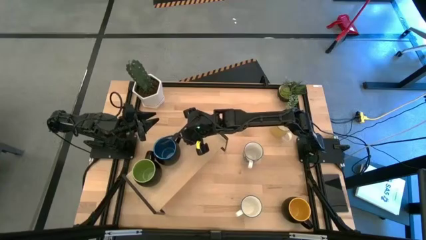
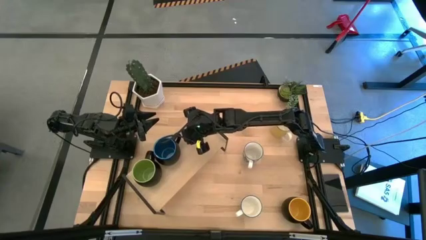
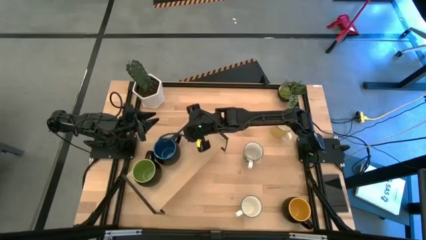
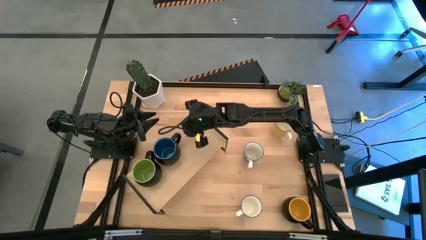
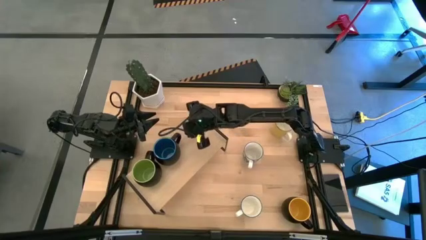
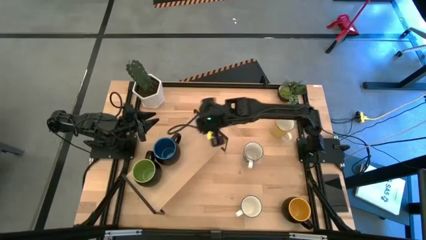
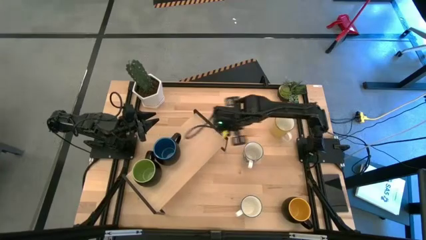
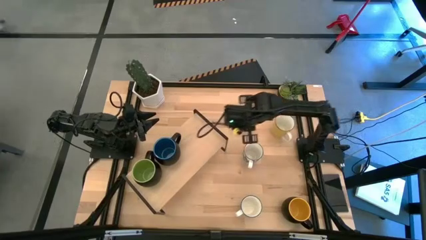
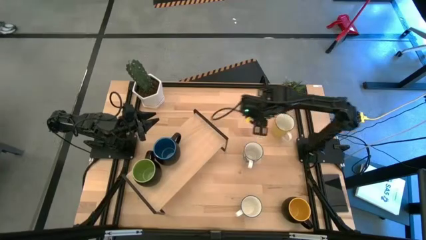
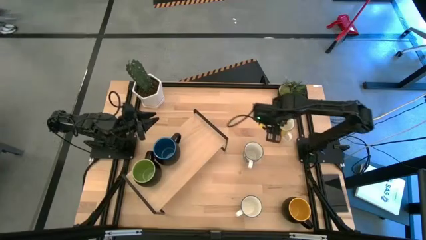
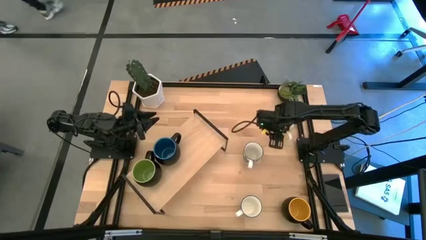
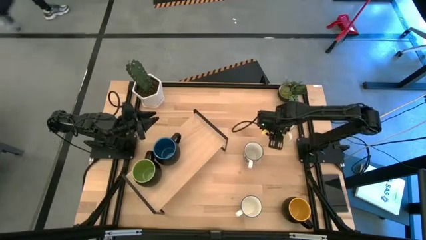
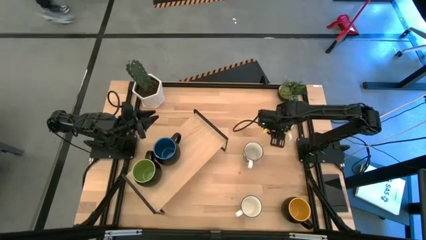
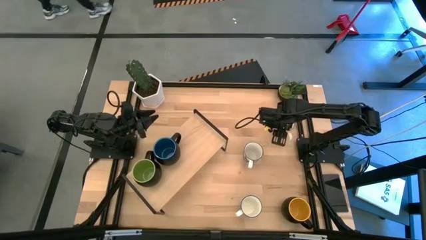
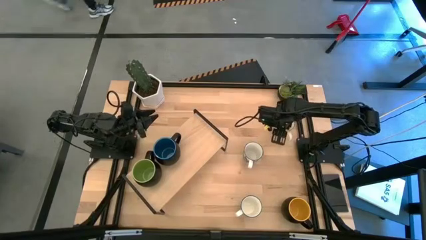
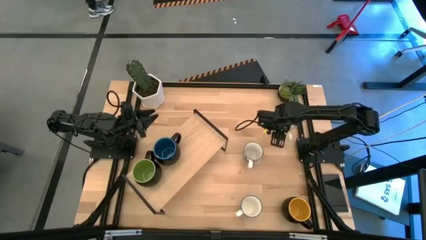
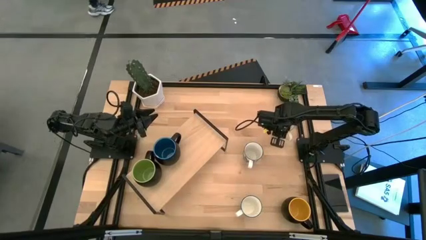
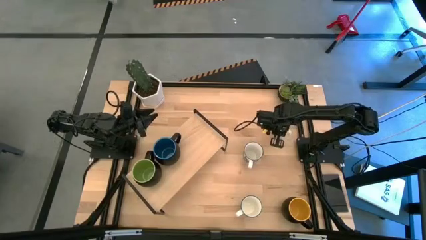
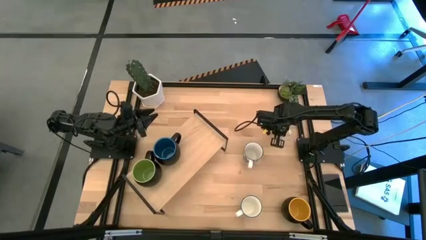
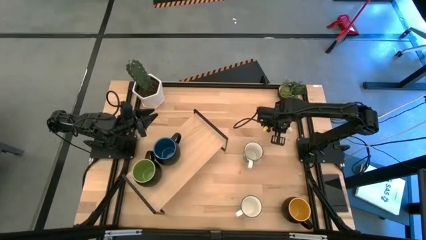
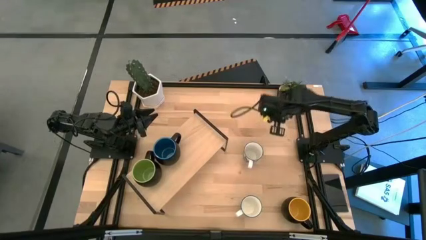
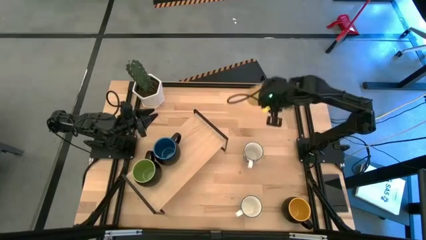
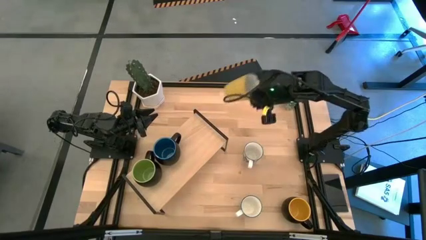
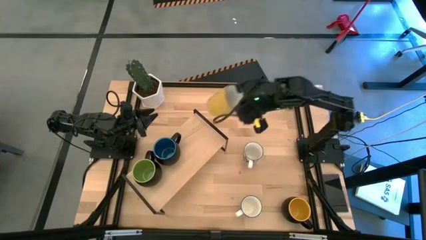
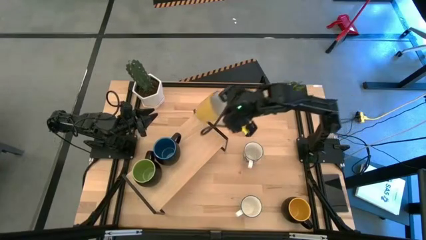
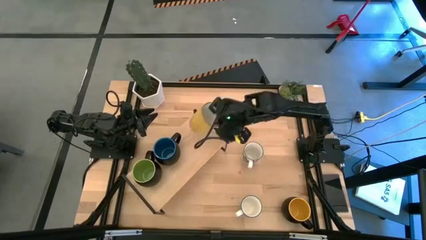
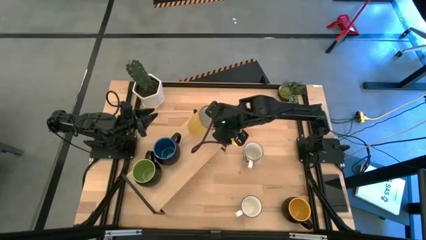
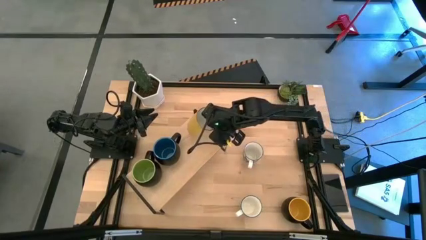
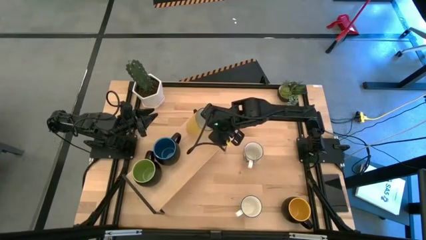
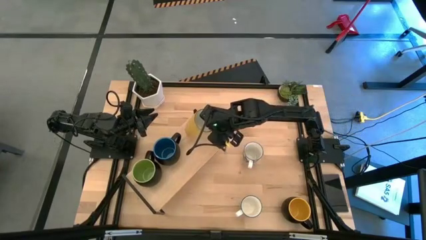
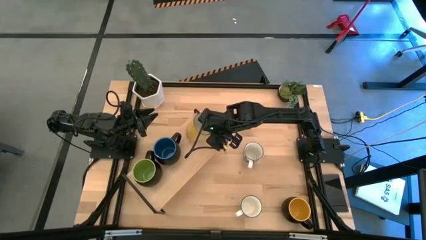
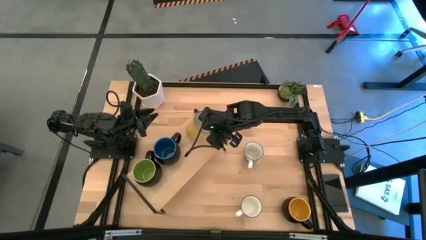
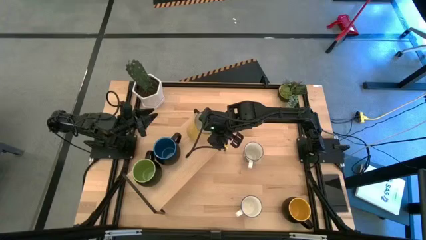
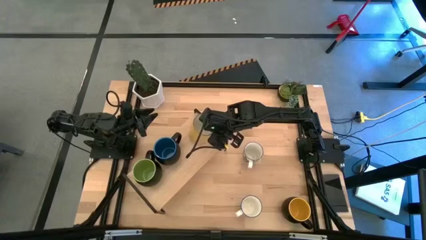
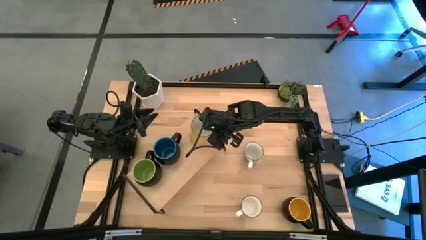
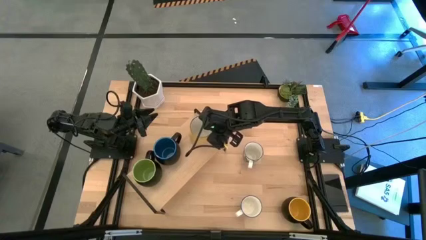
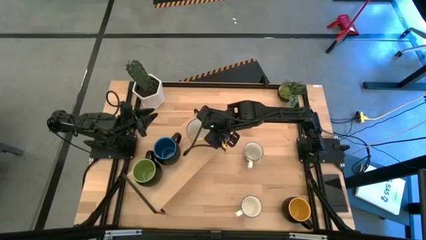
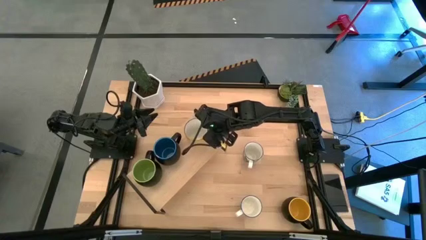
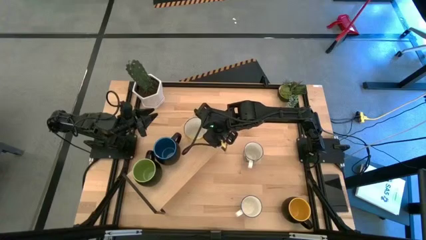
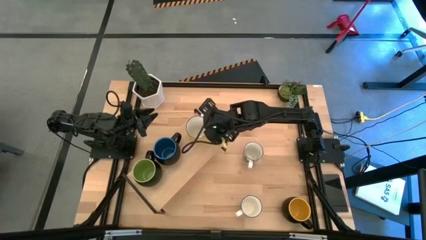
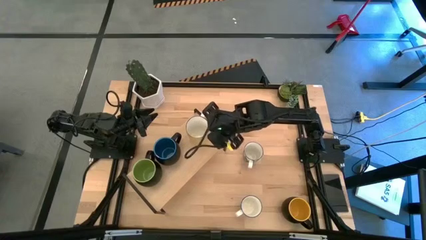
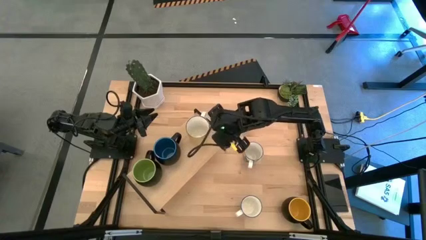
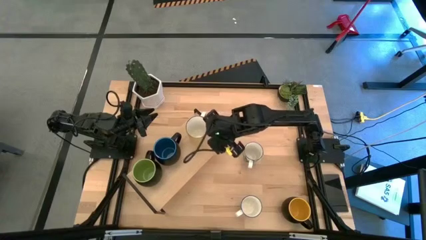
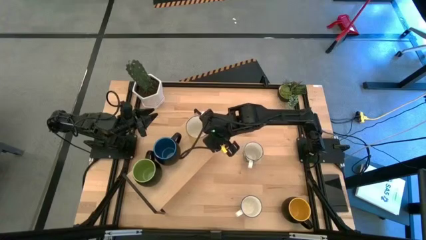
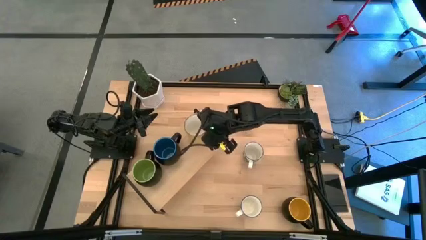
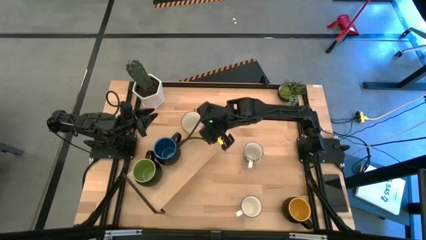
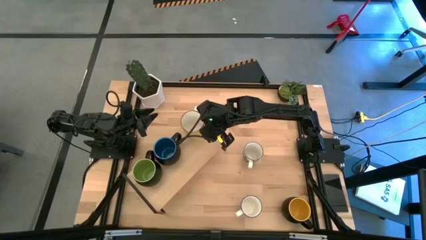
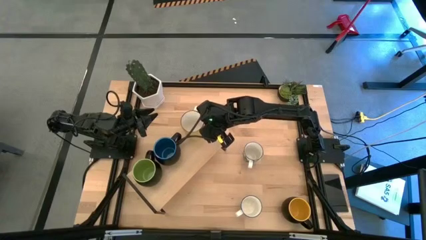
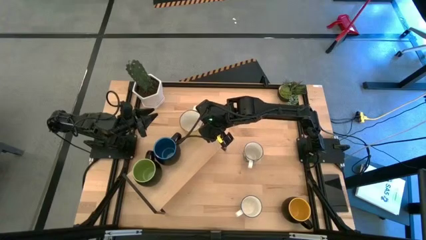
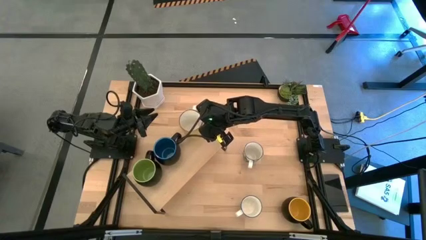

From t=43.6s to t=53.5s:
Task: Place coffee mugs
Put the yellow white mug on the shelf

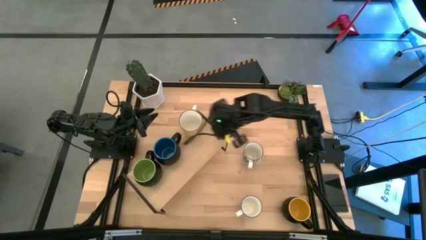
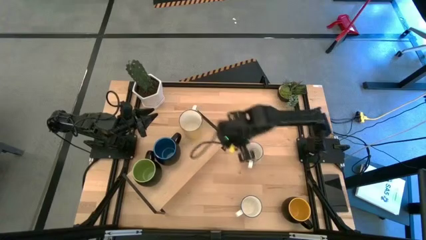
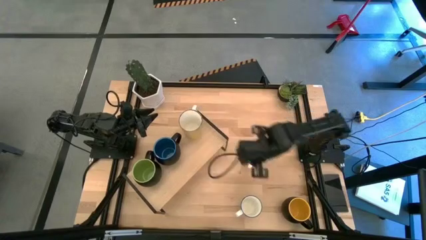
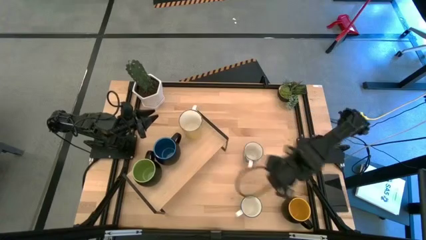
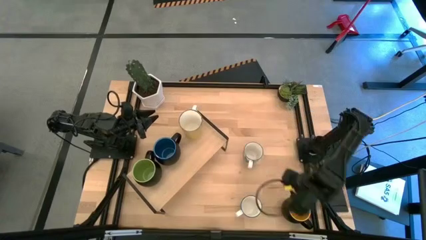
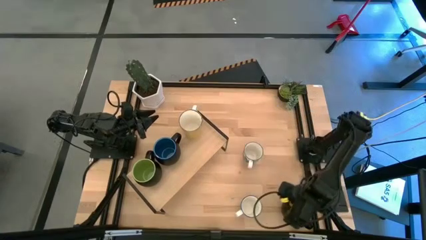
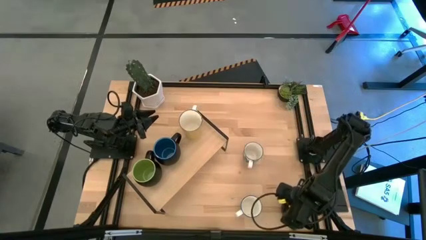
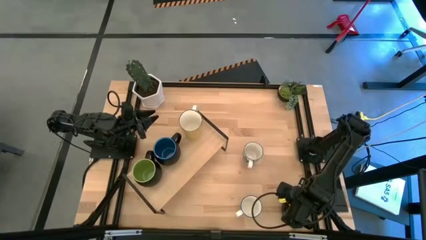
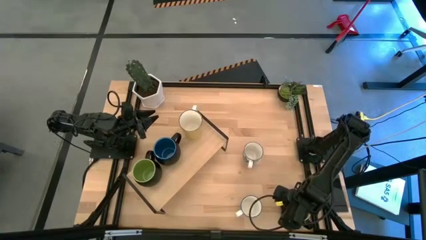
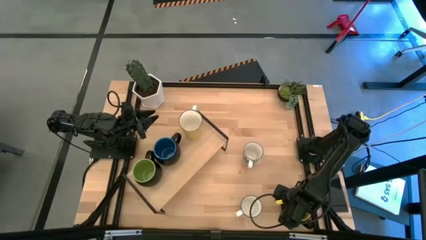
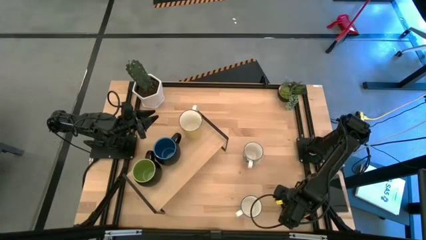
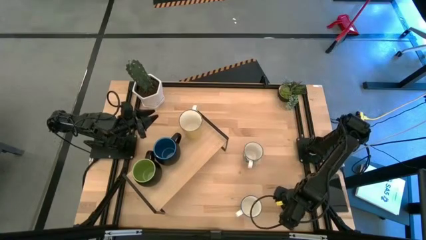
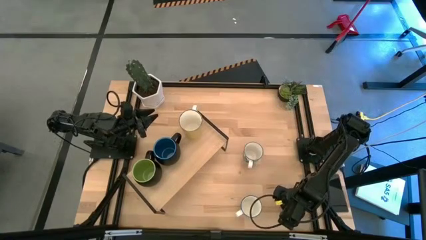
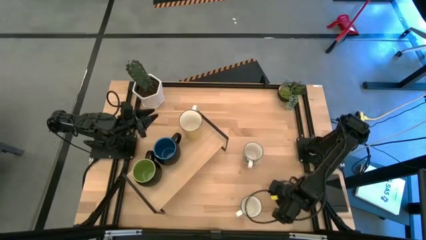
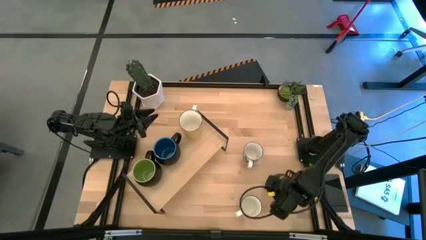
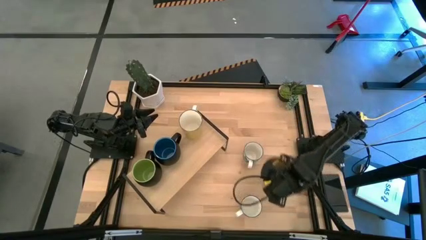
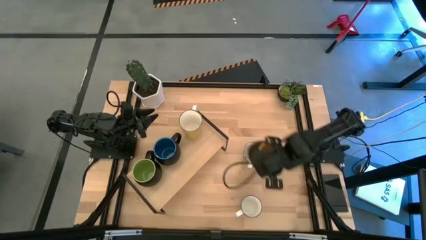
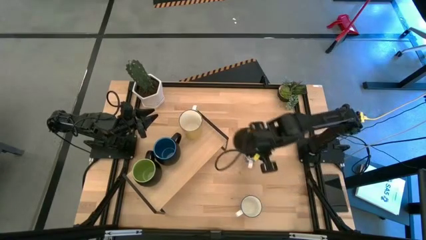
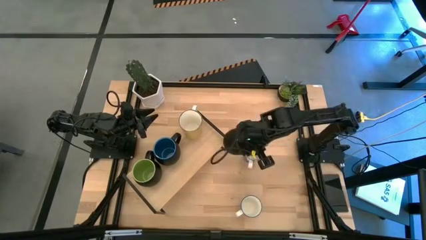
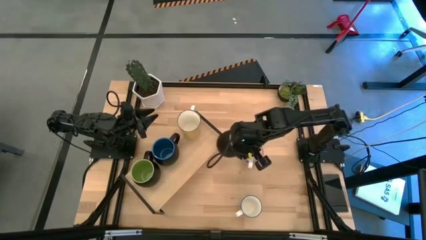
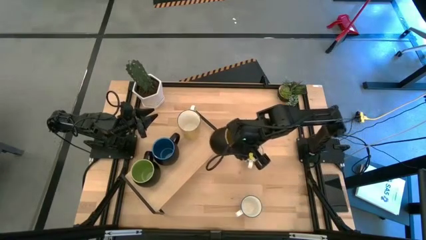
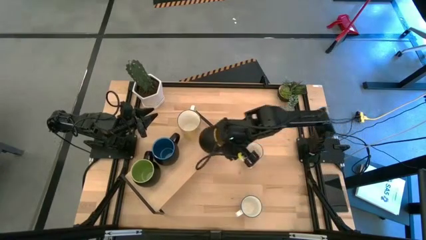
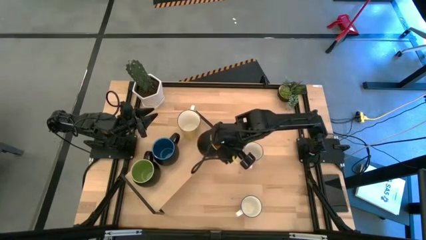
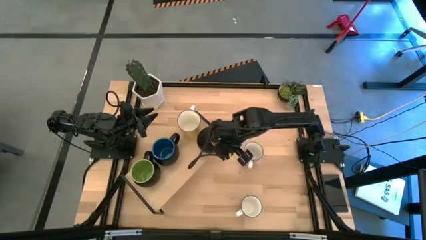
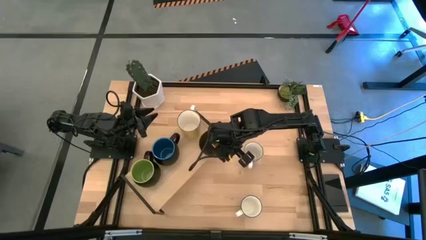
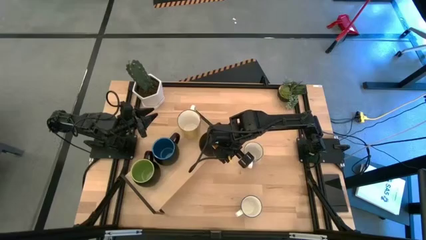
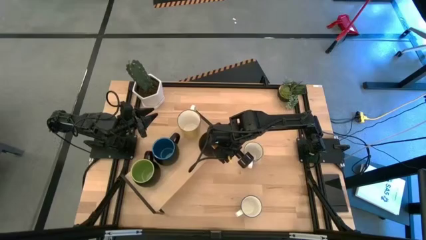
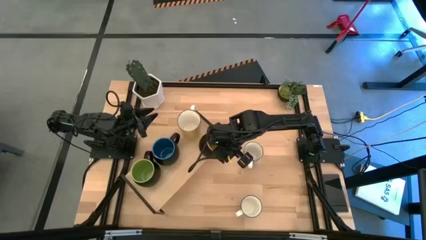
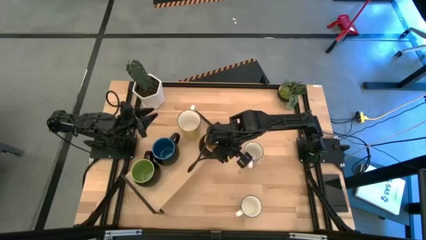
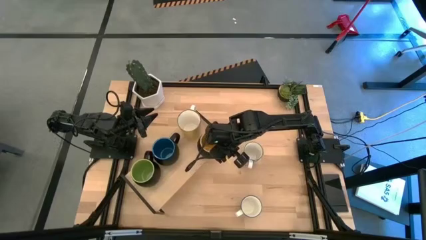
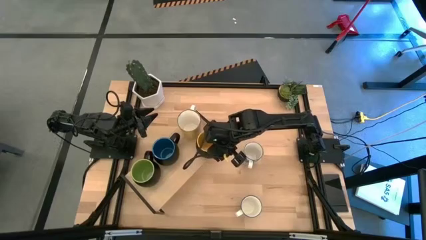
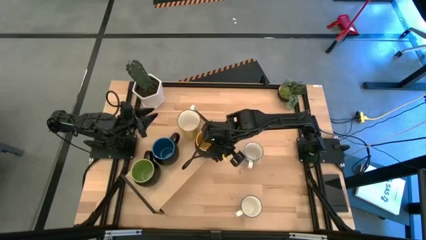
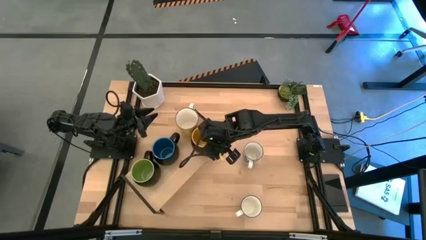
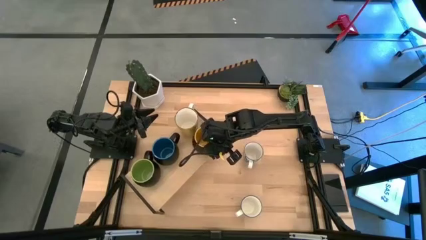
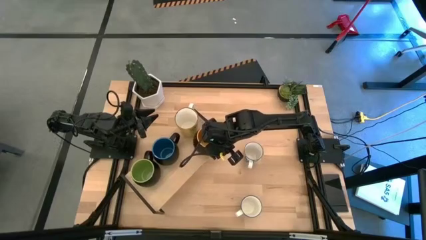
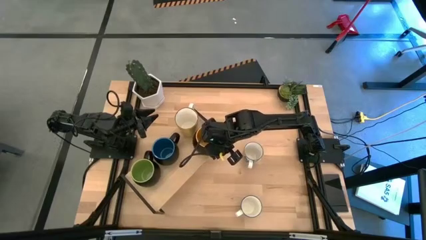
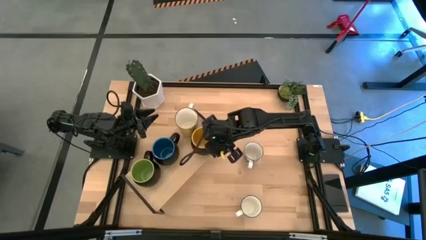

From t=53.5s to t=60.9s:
Put the yellow black mug on the shelf
